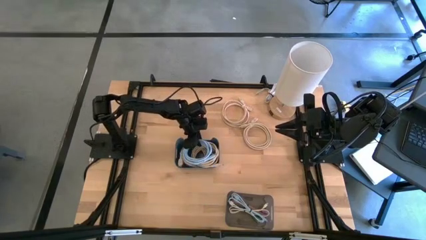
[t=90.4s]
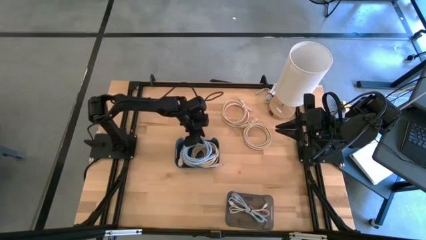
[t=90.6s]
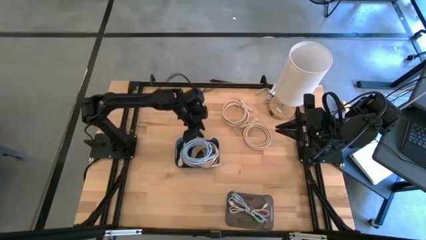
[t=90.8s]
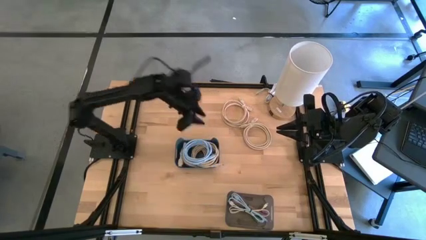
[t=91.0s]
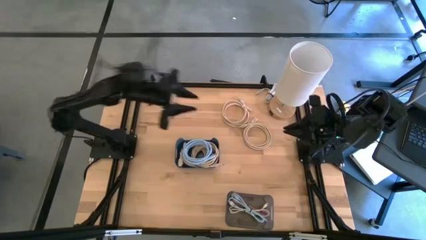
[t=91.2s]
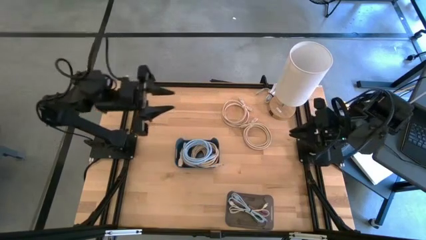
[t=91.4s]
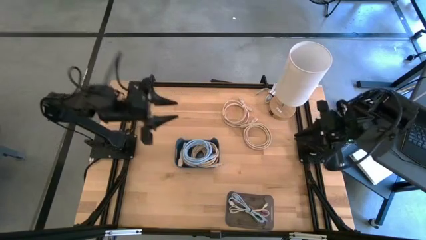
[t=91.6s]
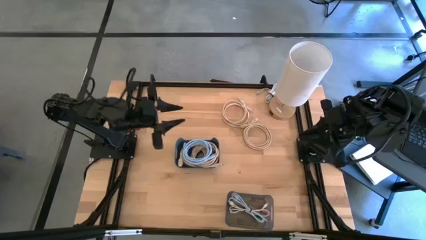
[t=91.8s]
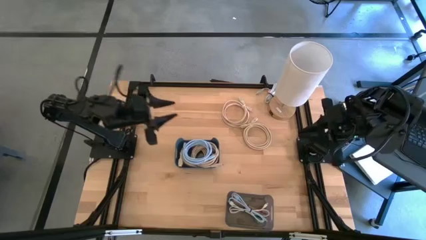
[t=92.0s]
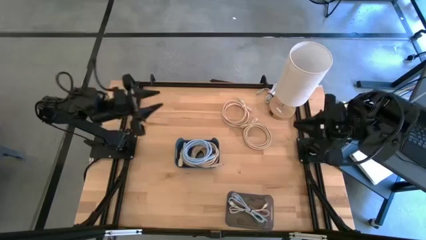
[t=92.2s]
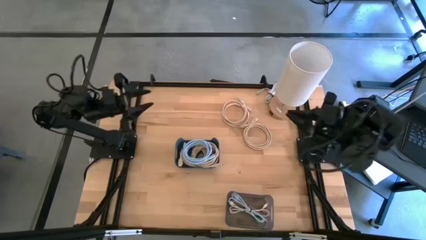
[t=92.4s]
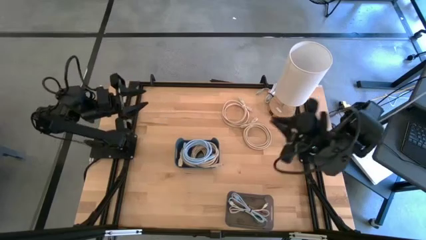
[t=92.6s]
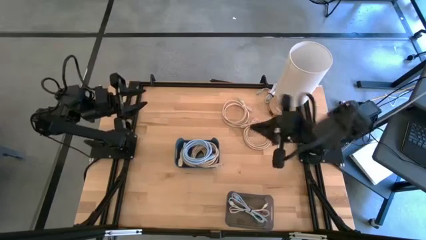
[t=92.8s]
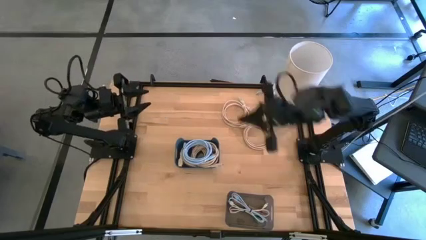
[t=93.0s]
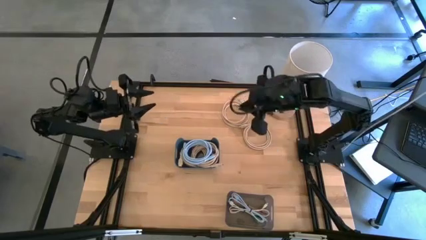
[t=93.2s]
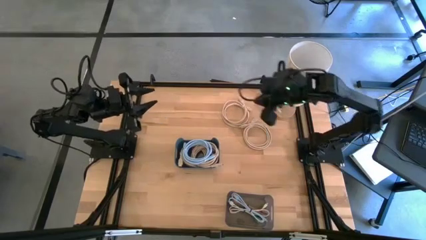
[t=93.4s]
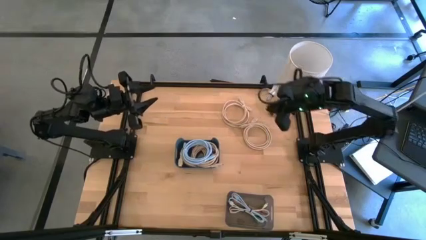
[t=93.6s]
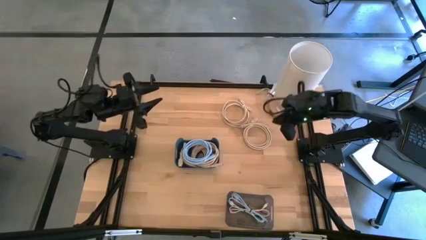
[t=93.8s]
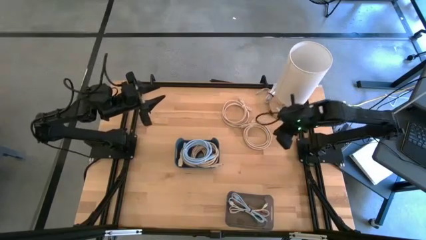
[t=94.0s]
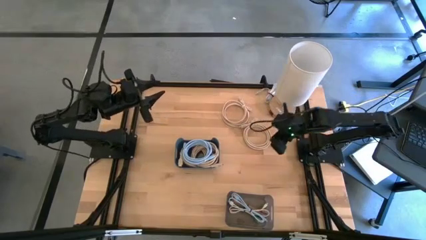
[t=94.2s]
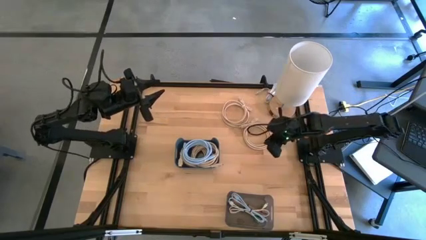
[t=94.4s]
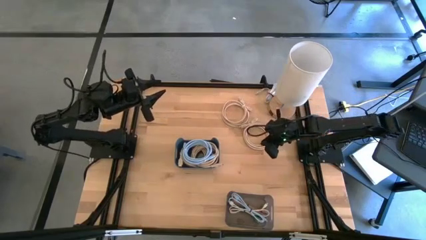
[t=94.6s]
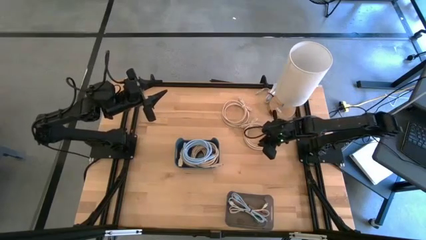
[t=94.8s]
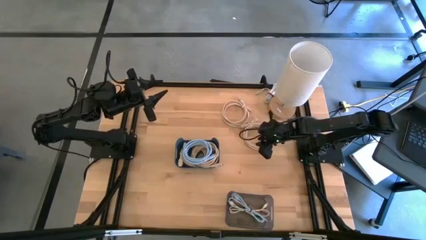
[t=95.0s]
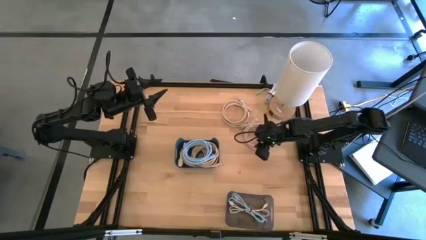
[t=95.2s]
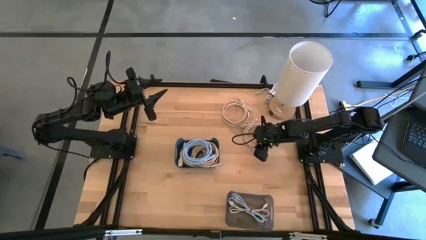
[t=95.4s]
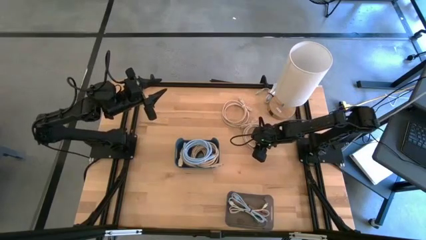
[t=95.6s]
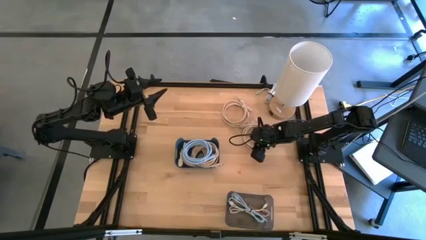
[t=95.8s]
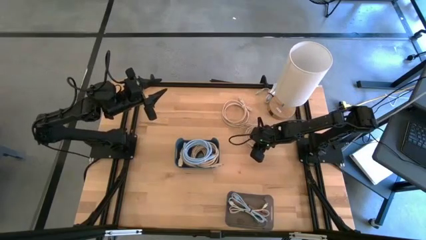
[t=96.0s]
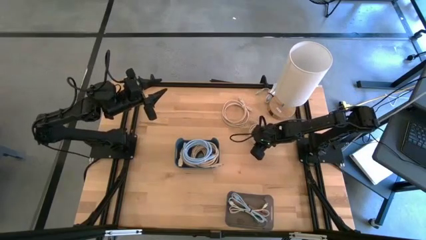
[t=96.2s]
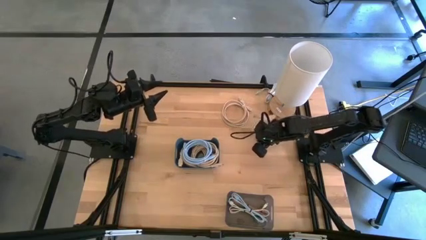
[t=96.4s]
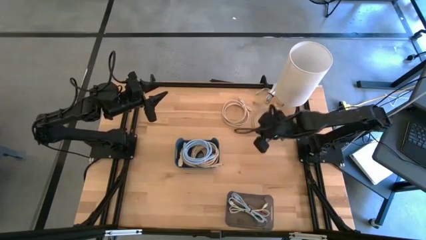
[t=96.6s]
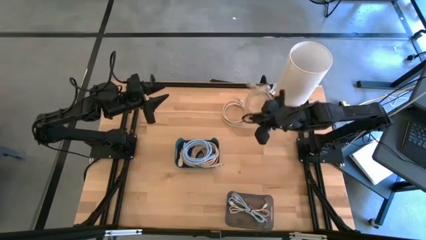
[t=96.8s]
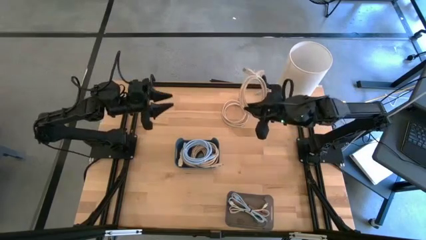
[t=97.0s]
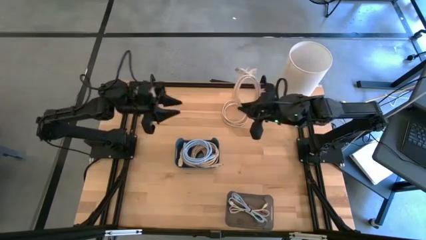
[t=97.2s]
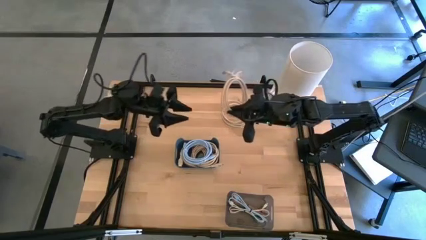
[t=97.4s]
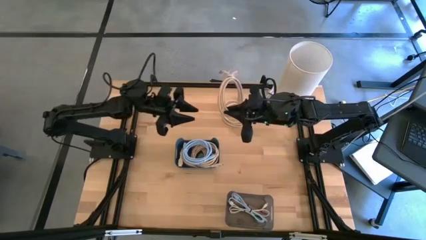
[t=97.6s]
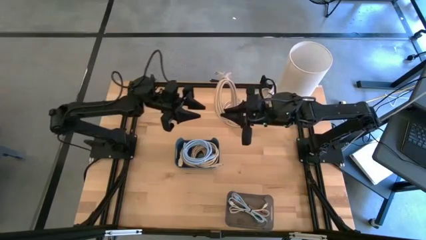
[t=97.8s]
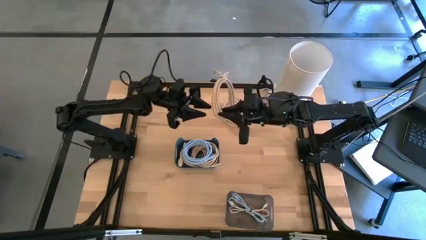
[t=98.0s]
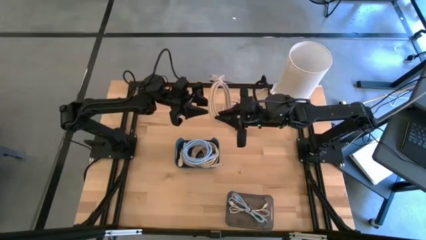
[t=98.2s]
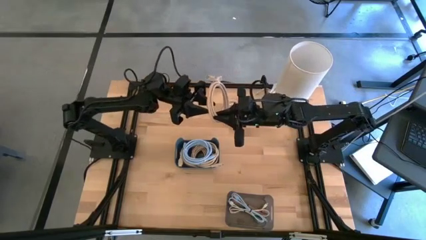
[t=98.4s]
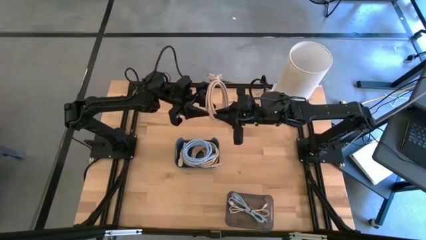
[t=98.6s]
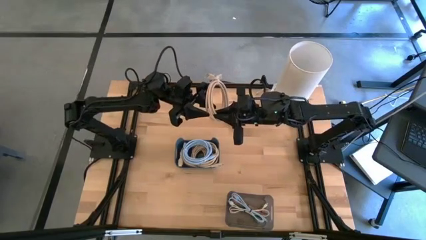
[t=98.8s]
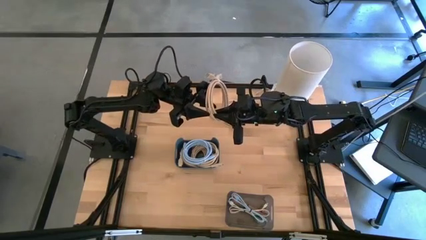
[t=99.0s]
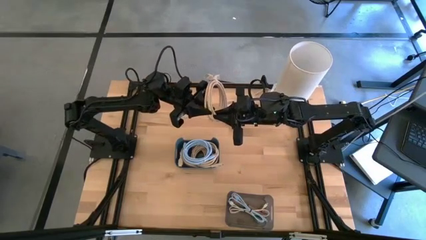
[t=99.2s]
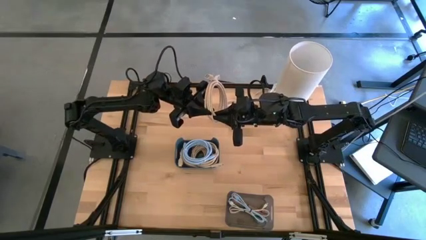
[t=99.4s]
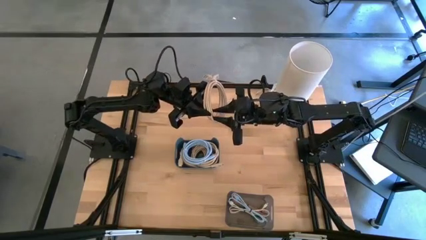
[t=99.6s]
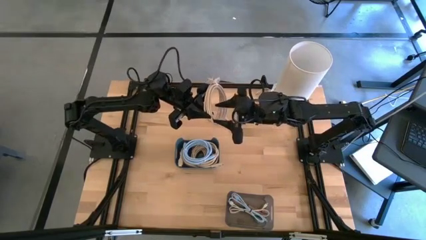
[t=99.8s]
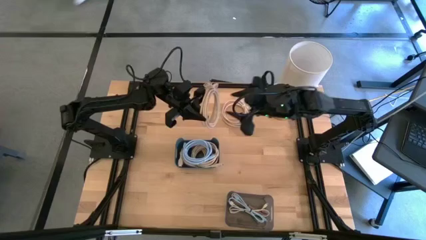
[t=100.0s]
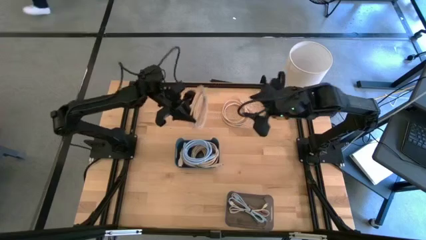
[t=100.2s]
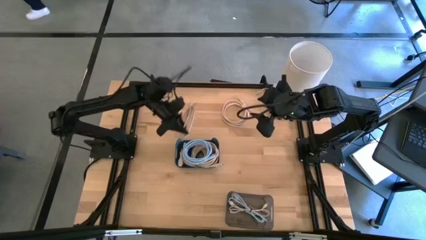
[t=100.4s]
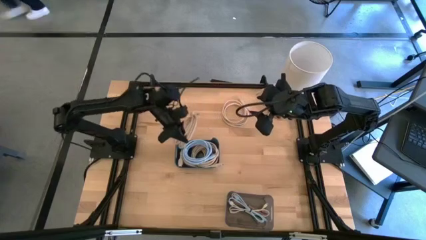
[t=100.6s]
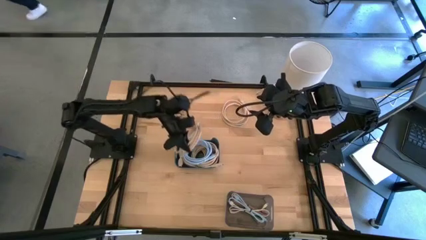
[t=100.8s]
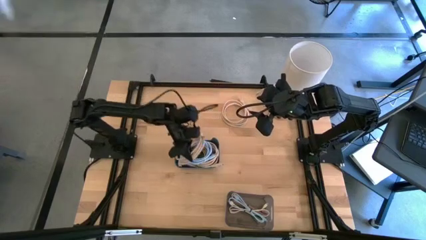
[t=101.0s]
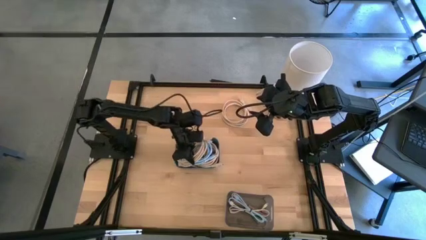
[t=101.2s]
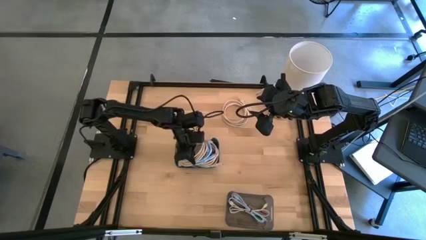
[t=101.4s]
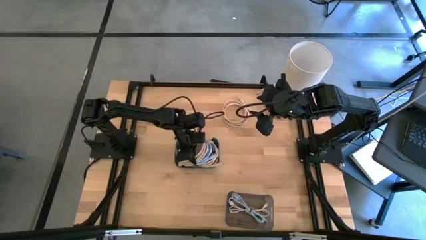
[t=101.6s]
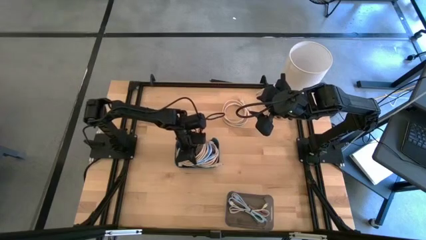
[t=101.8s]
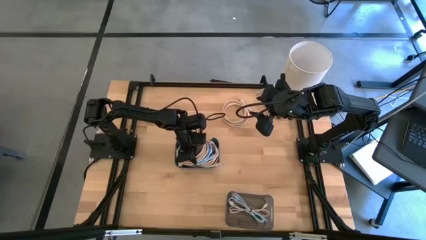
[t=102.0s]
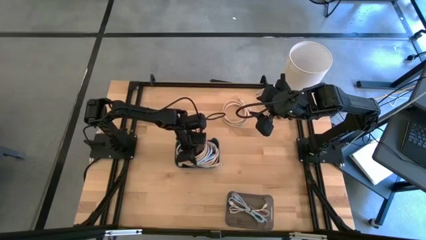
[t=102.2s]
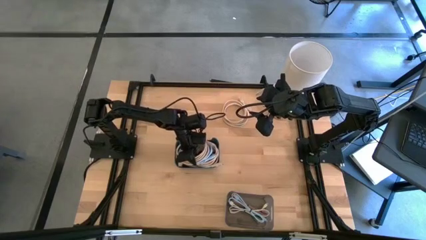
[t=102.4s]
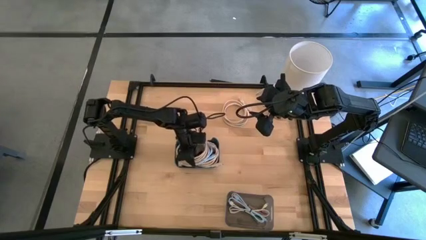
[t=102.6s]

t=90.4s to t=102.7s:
Put the brown charger cable into the blue bin
